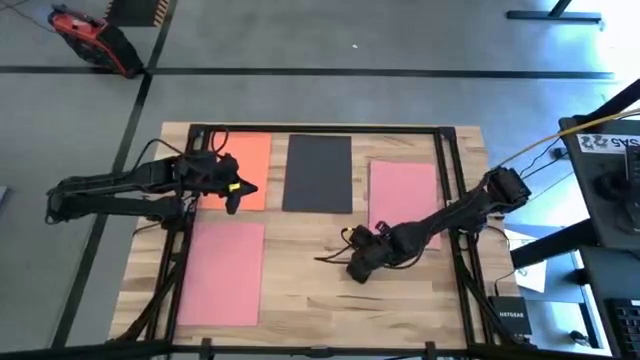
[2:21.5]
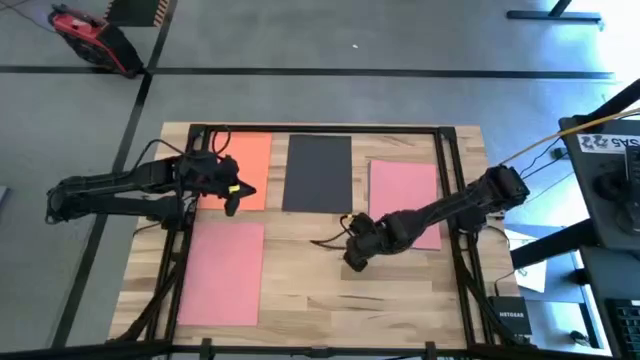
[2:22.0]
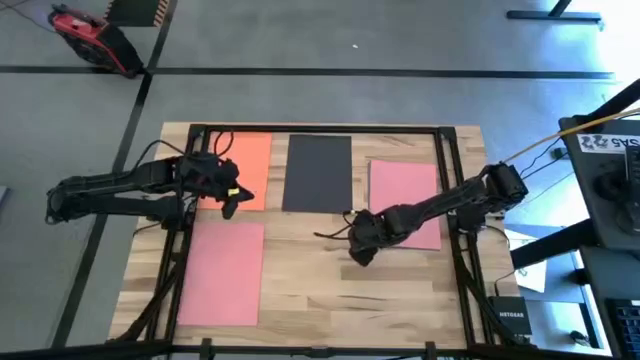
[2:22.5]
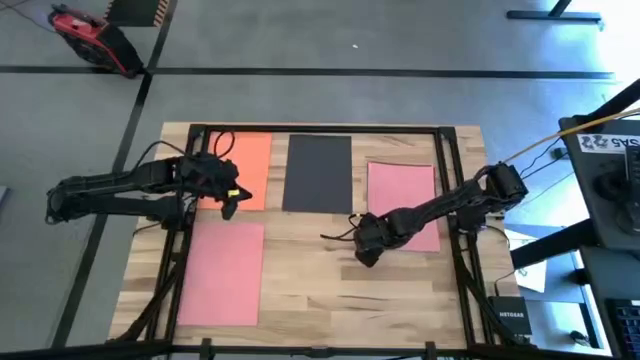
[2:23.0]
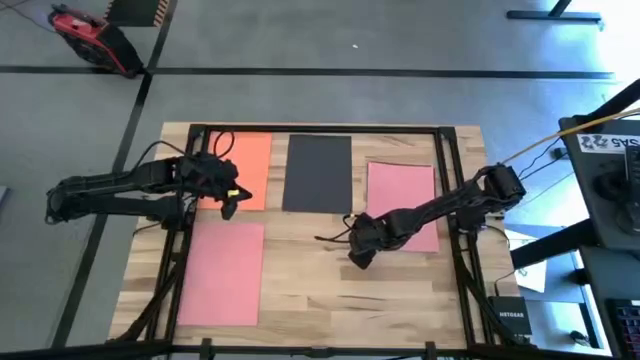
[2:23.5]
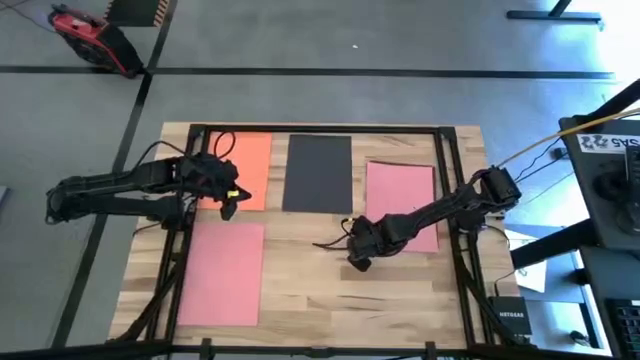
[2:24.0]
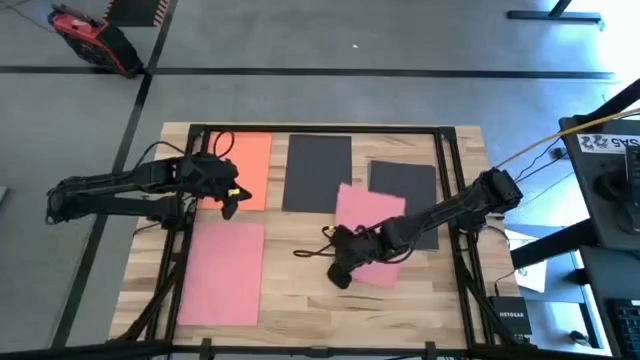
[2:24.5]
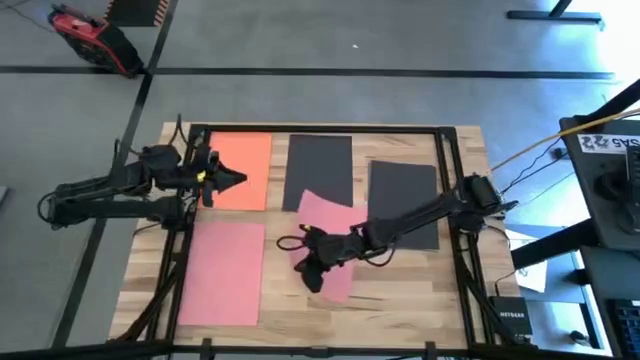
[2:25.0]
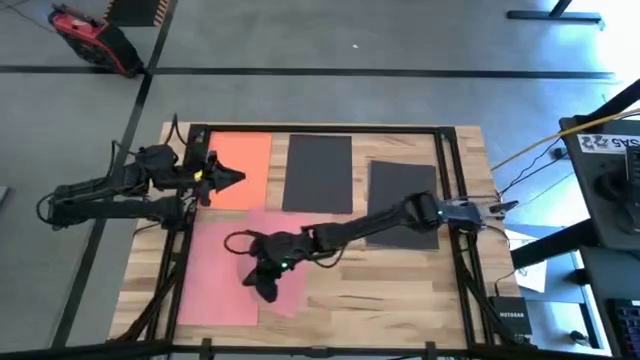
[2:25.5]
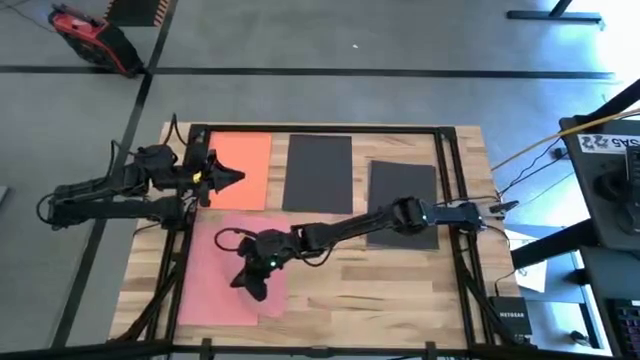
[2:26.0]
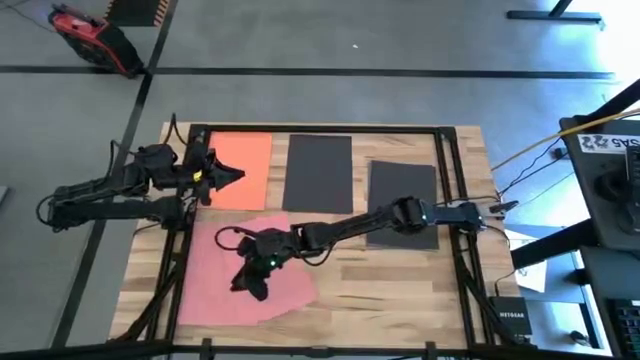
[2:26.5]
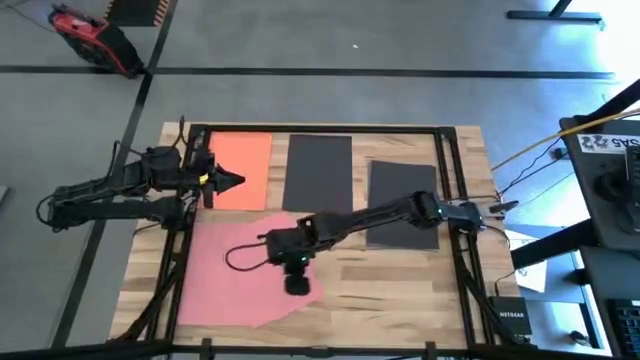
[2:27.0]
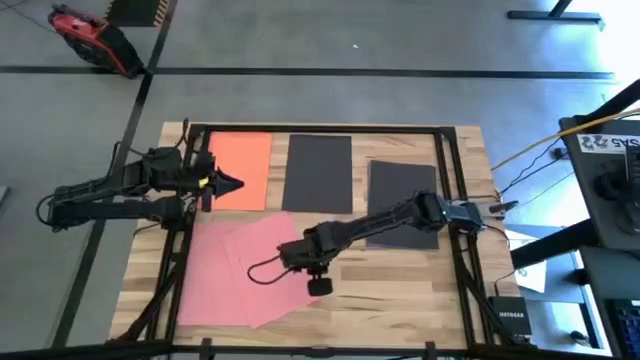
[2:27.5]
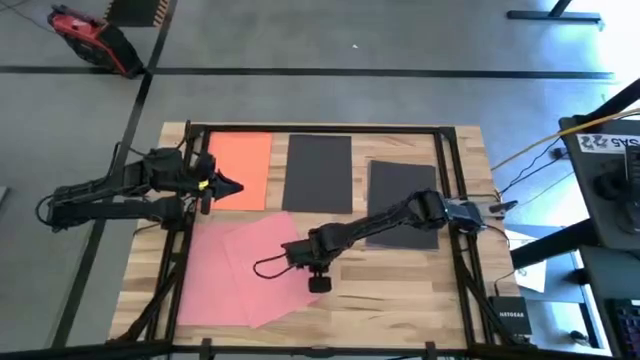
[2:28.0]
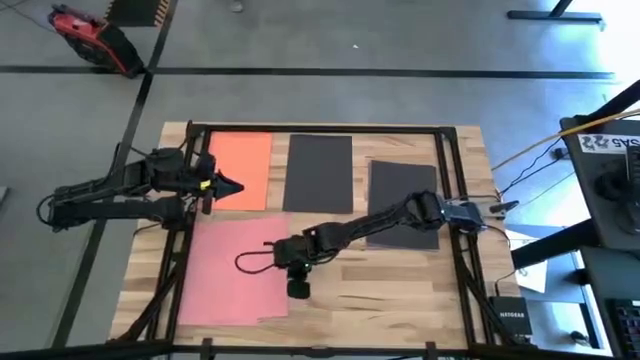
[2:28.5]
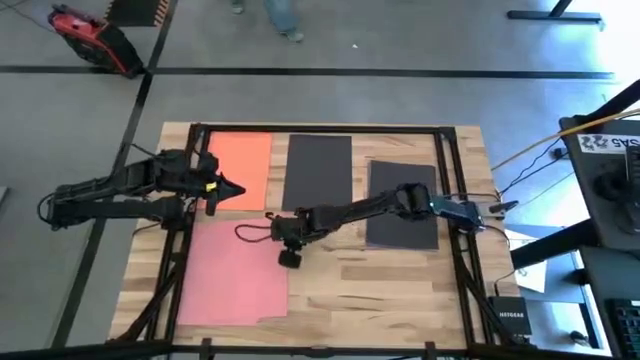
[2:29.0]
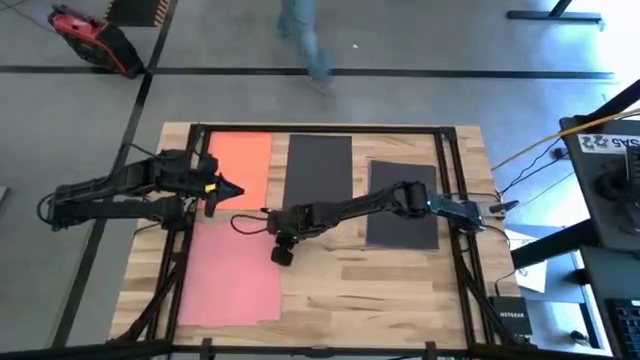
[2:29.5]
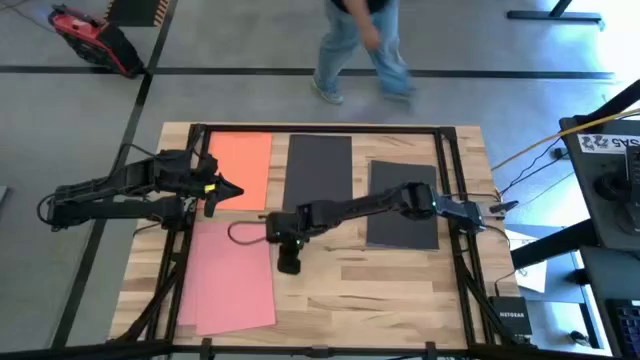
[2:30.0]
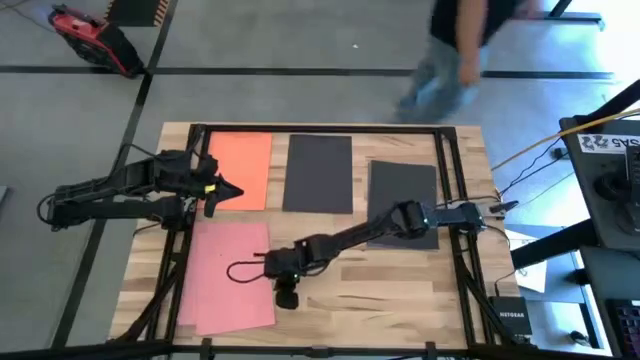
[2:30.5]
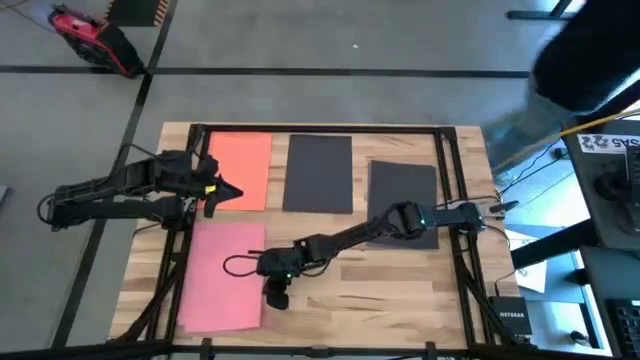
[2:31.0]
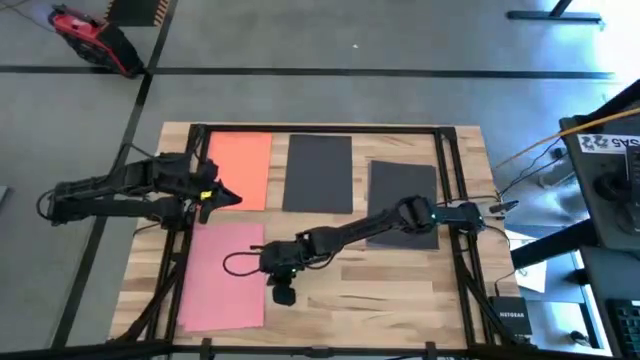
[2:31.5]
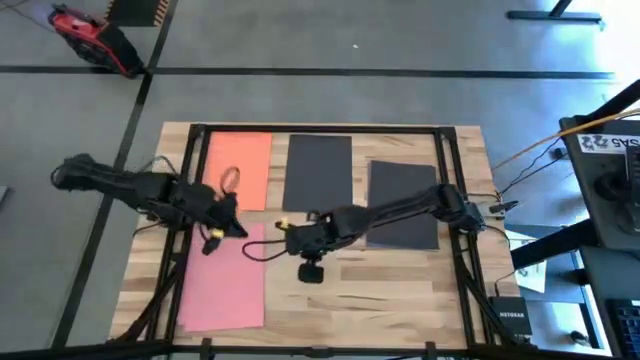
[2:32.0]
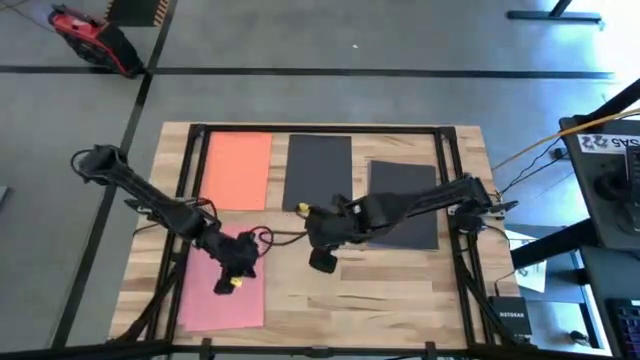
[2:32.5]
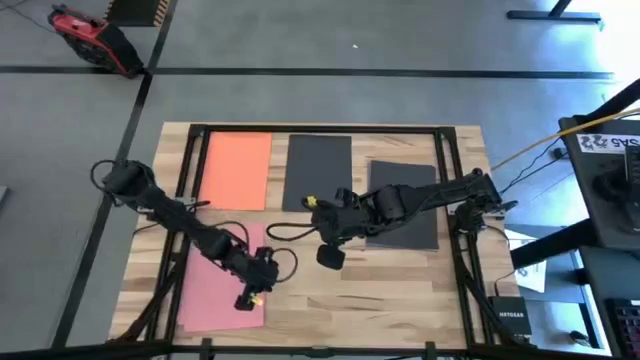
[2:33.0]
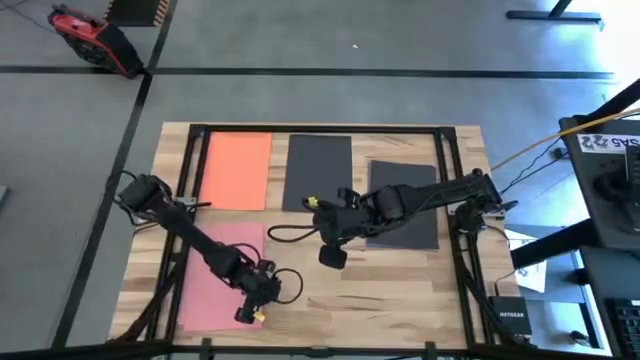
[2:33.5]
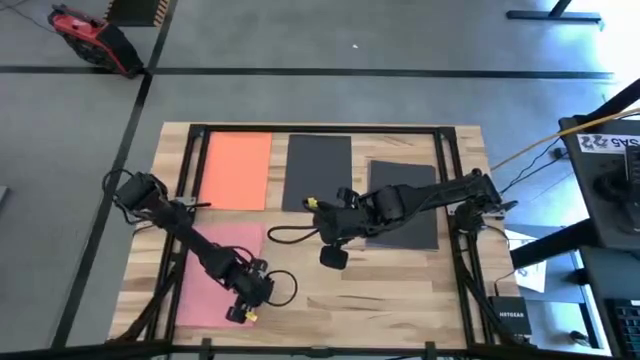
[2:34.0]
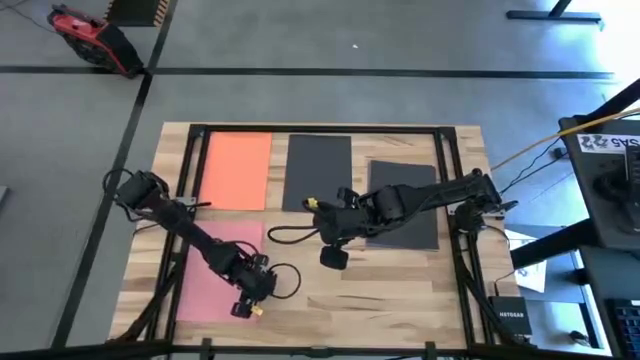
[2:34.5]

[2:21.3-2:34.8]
Task: Organize paper
Stack the pink color paper on top of the other pink color paper

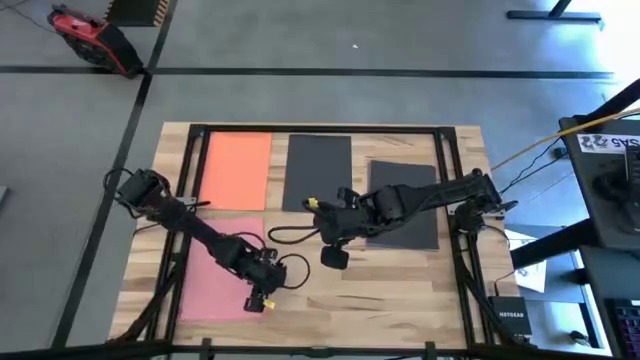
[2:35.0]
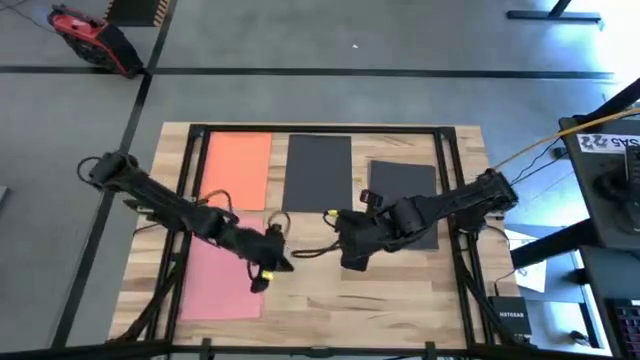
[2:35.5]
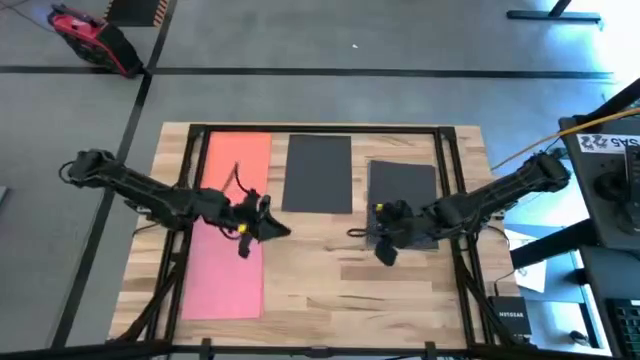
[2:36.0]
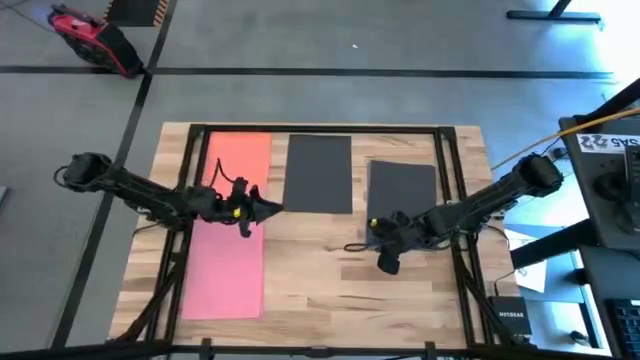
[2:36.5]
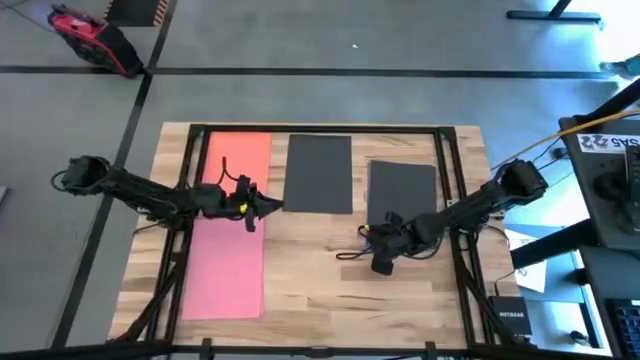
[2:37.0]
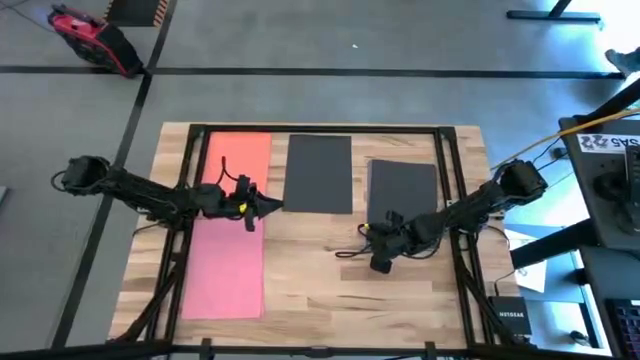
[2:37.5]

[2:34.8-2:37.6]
Stack the black color paper on top of the other black color paper

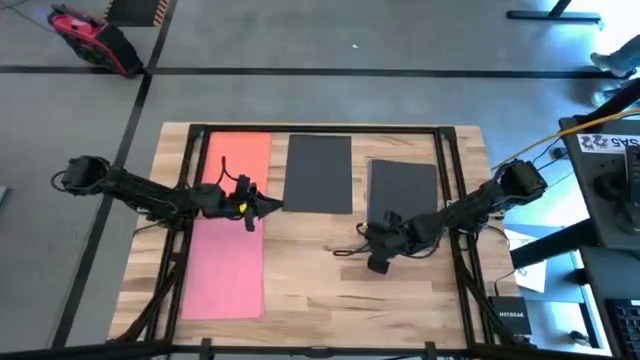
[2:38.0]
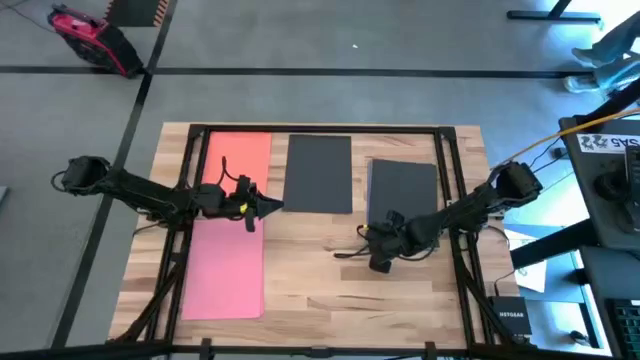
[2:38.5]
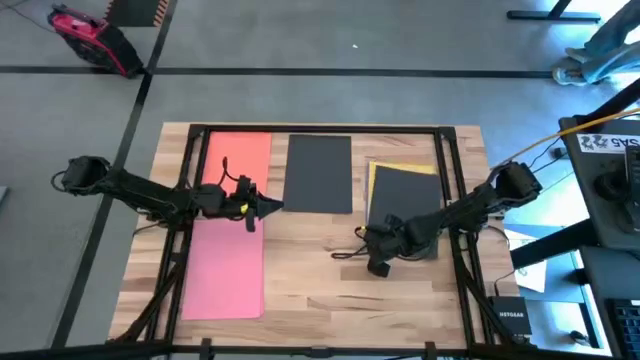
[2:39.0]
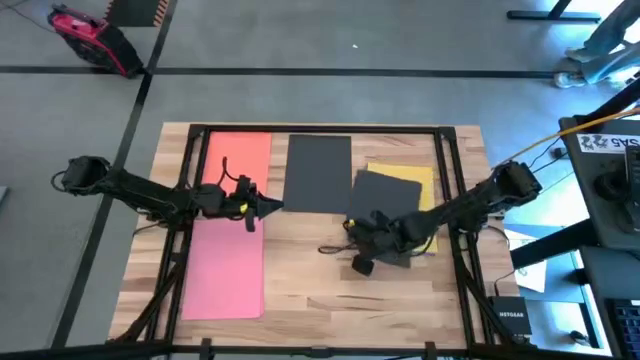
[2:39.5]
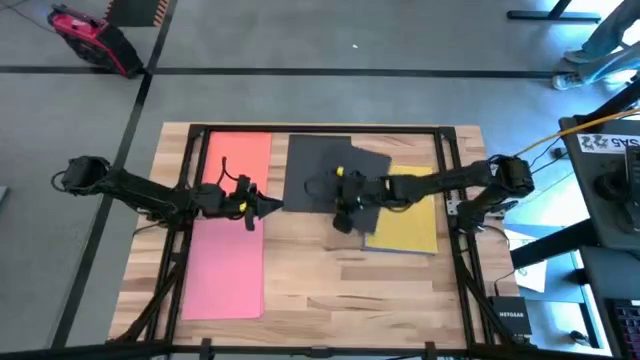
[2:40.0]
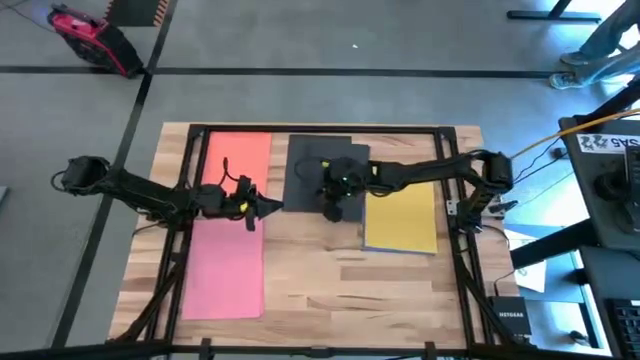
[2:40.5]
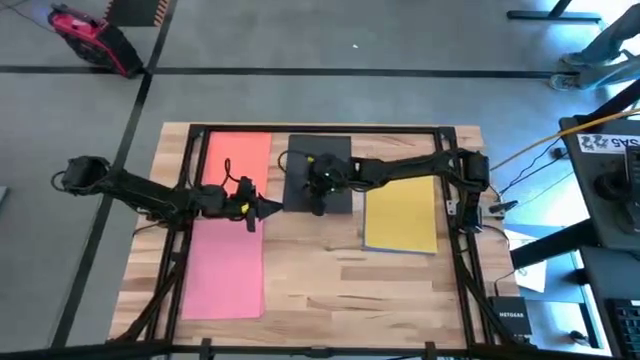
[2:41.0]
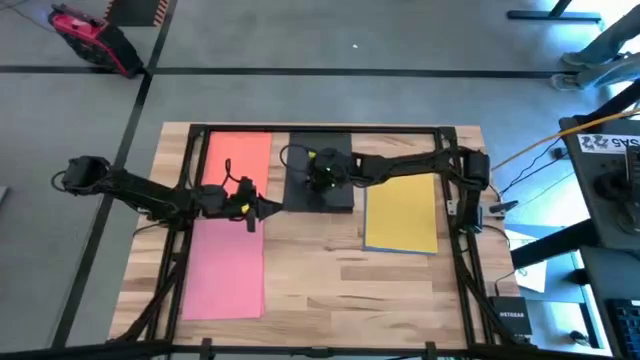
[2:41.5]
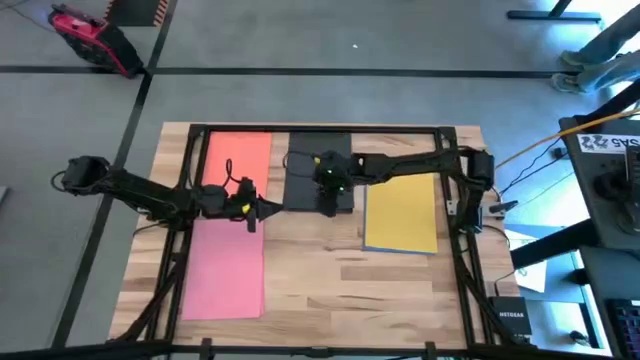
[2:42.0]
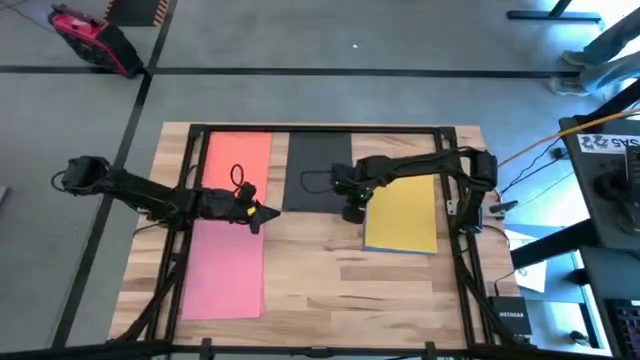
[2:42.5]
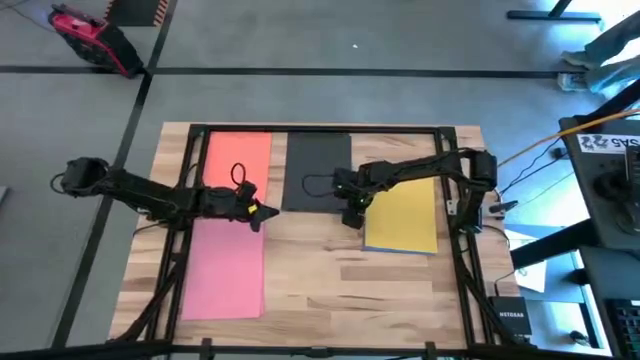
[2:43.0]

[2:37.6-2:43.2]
Stack the black color paper on top of the other black color paper
